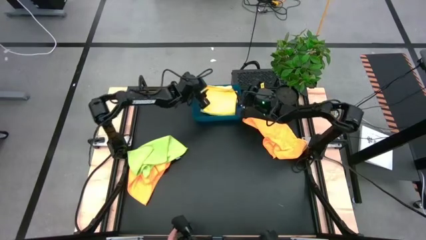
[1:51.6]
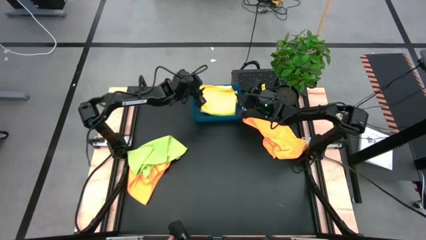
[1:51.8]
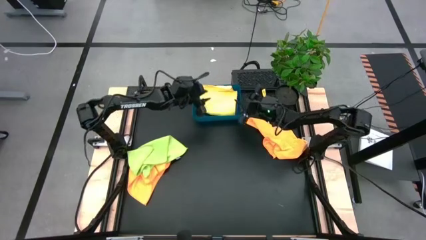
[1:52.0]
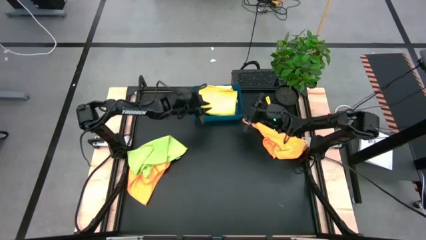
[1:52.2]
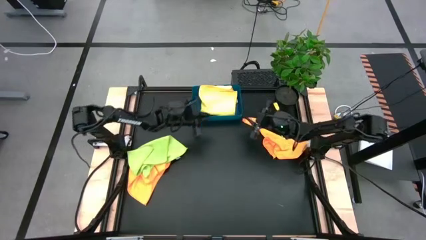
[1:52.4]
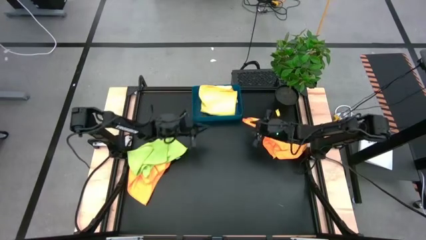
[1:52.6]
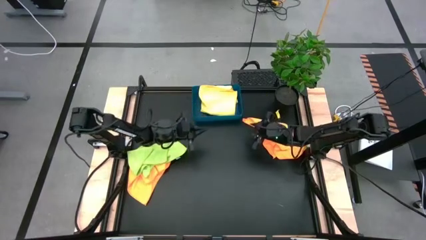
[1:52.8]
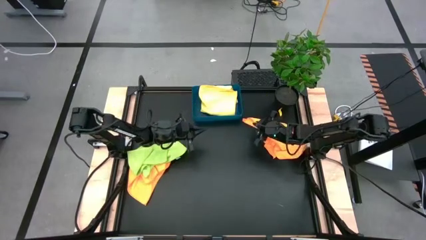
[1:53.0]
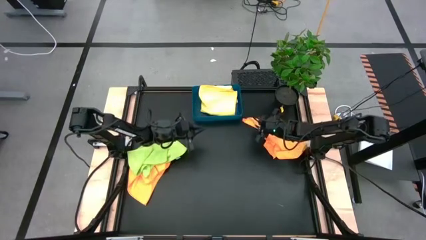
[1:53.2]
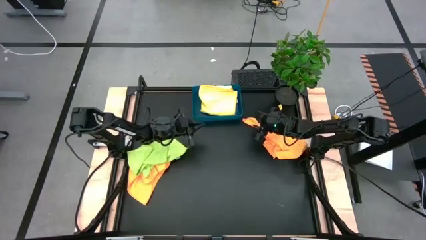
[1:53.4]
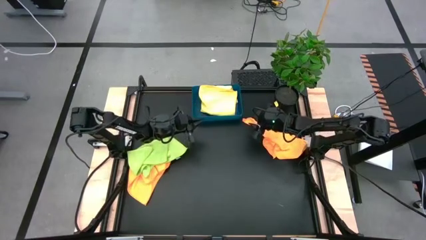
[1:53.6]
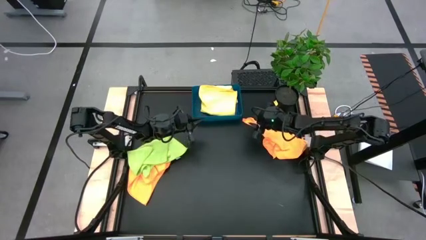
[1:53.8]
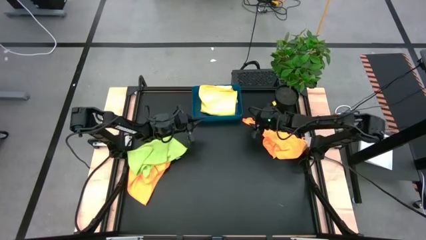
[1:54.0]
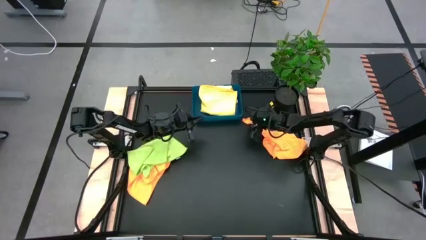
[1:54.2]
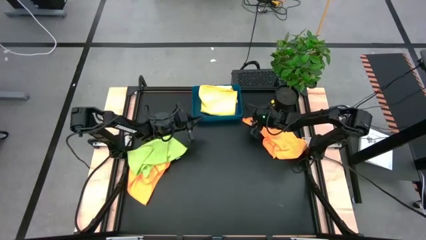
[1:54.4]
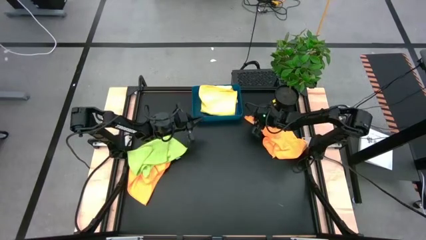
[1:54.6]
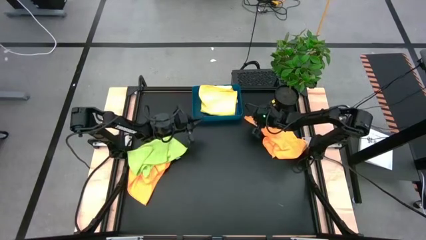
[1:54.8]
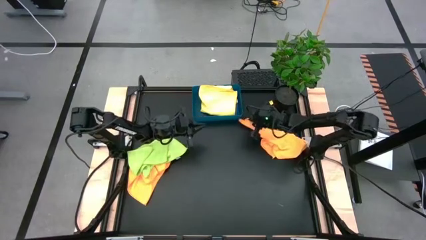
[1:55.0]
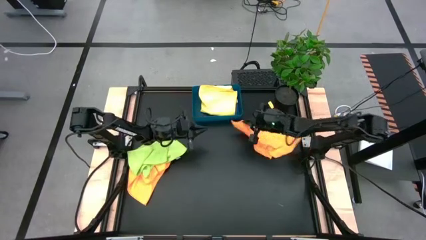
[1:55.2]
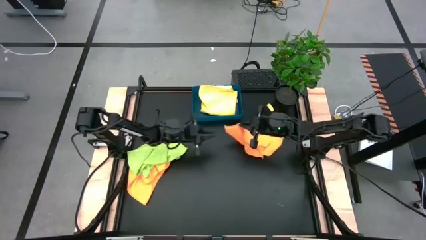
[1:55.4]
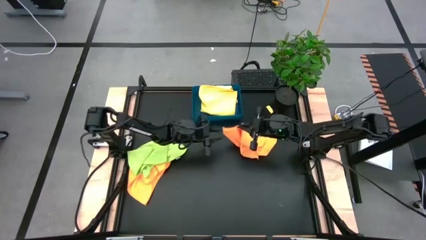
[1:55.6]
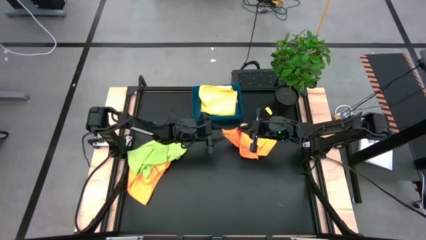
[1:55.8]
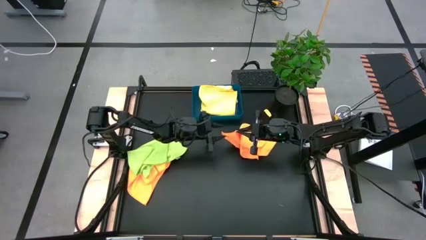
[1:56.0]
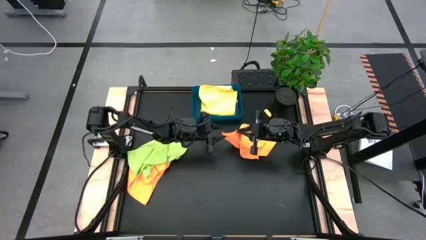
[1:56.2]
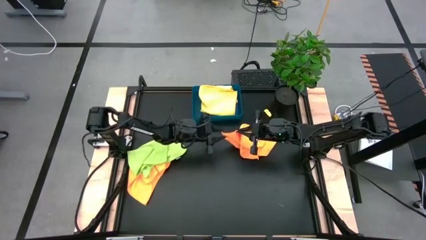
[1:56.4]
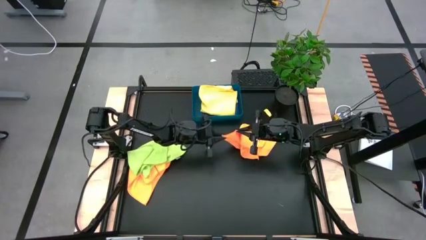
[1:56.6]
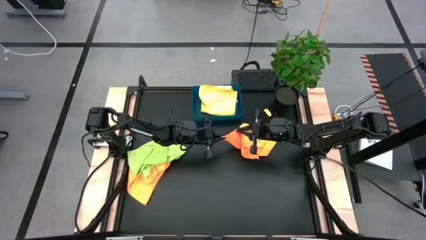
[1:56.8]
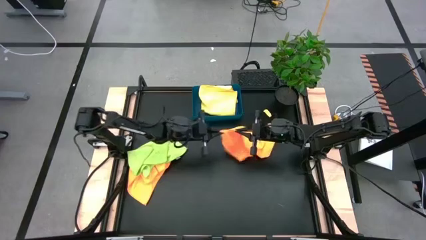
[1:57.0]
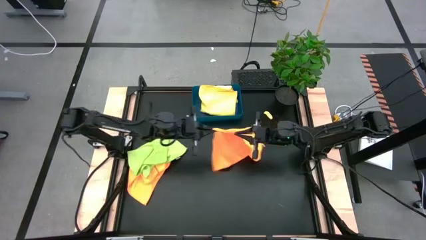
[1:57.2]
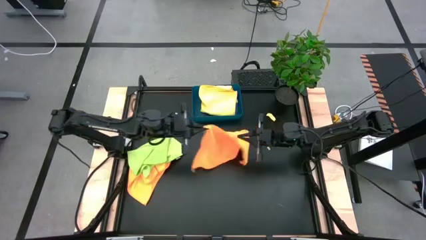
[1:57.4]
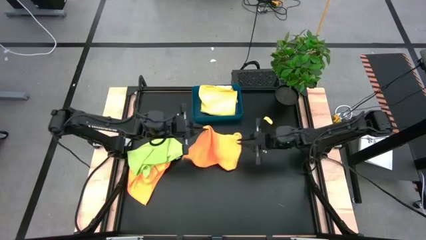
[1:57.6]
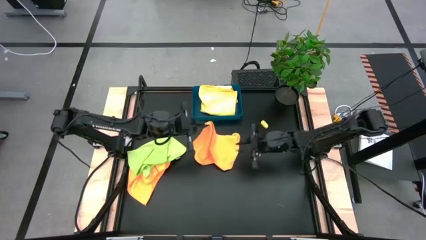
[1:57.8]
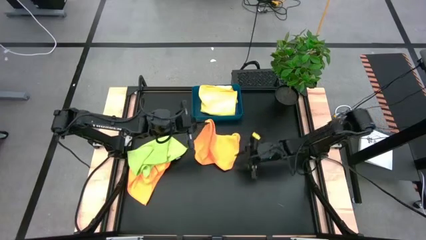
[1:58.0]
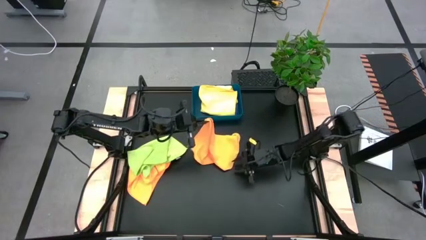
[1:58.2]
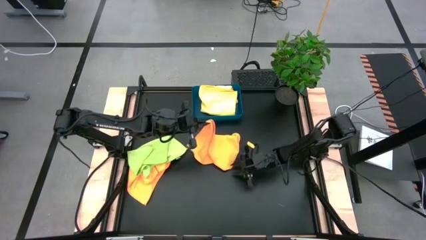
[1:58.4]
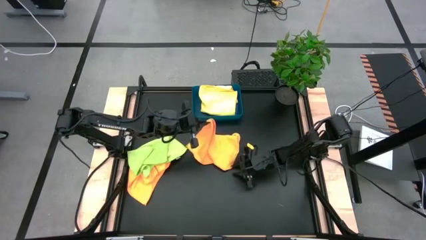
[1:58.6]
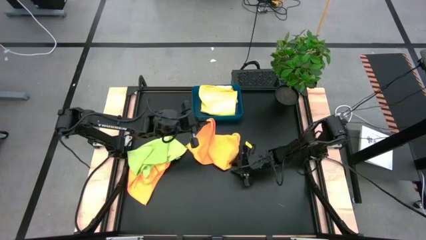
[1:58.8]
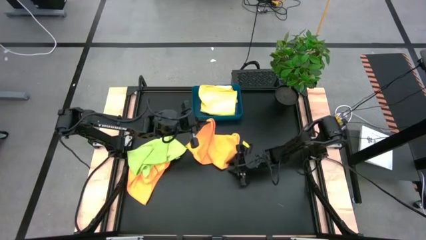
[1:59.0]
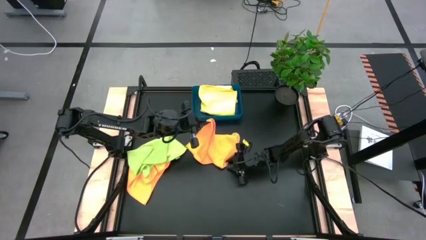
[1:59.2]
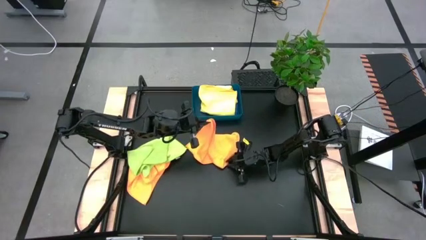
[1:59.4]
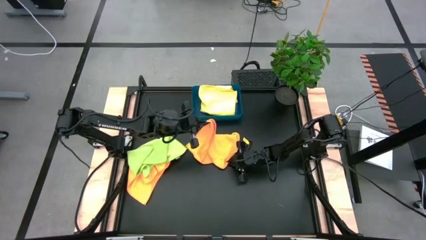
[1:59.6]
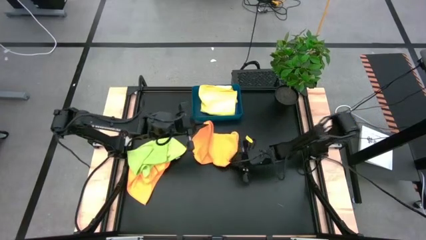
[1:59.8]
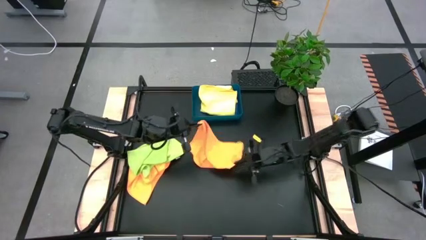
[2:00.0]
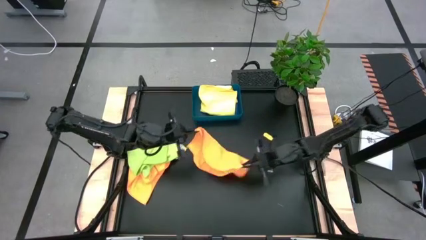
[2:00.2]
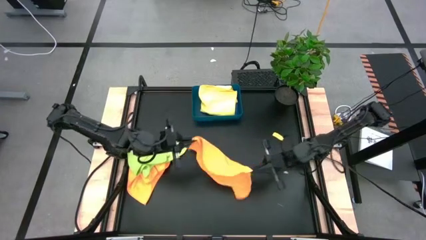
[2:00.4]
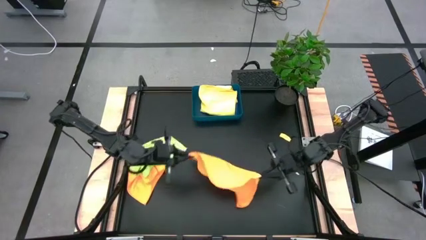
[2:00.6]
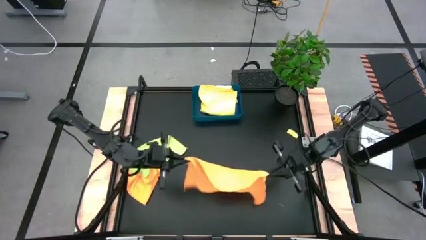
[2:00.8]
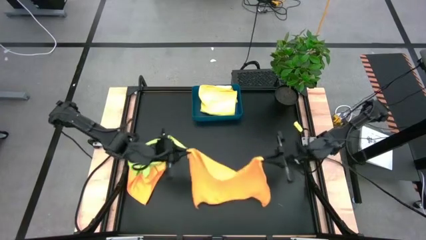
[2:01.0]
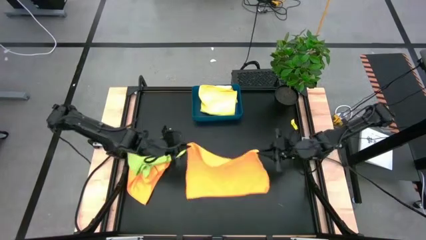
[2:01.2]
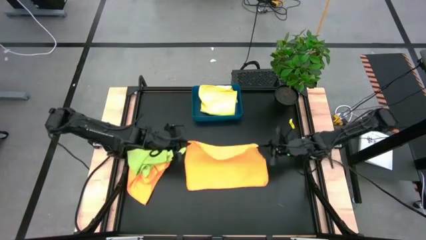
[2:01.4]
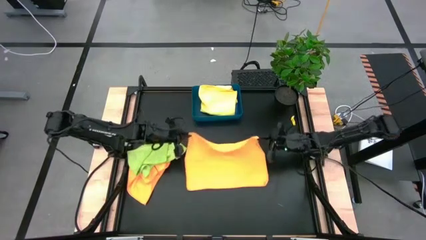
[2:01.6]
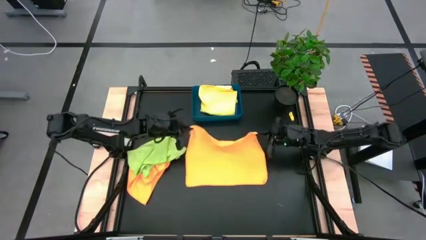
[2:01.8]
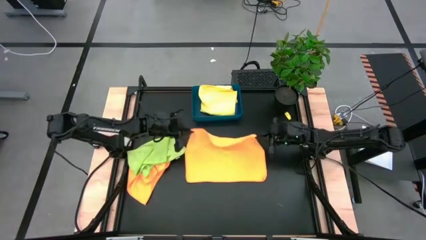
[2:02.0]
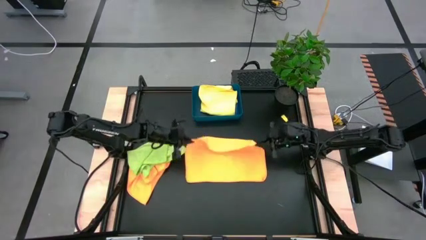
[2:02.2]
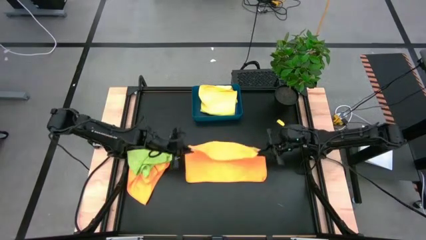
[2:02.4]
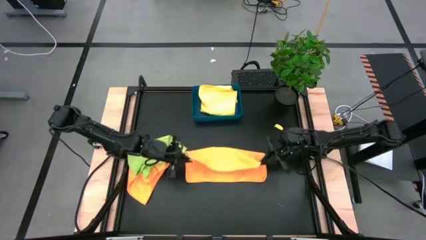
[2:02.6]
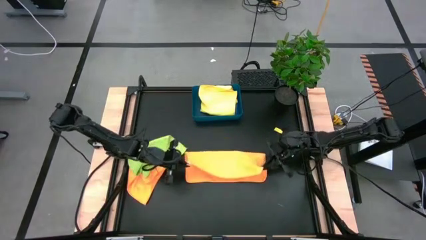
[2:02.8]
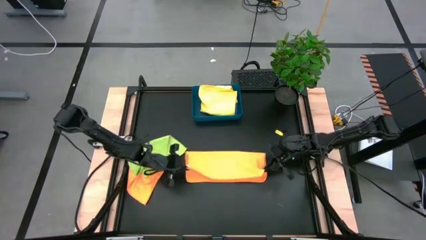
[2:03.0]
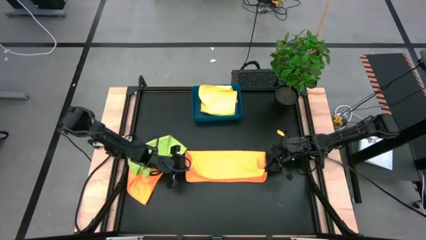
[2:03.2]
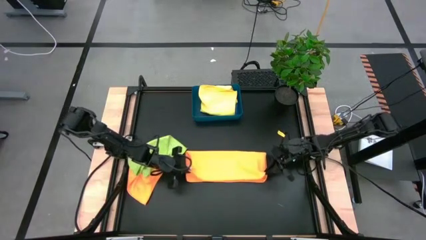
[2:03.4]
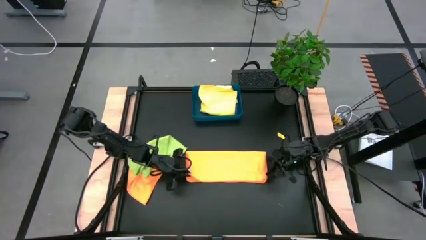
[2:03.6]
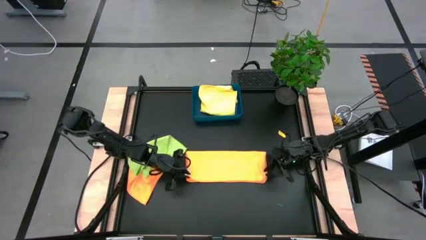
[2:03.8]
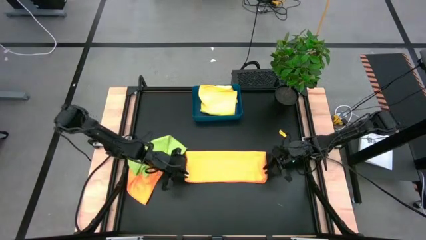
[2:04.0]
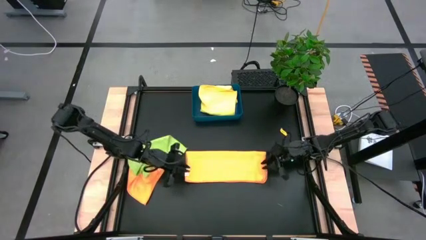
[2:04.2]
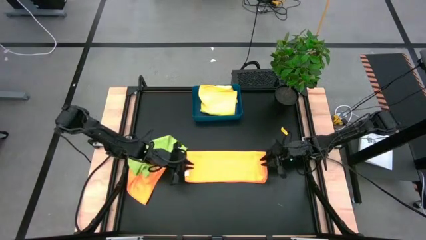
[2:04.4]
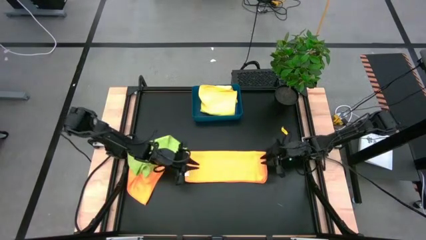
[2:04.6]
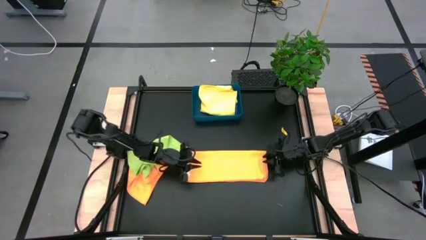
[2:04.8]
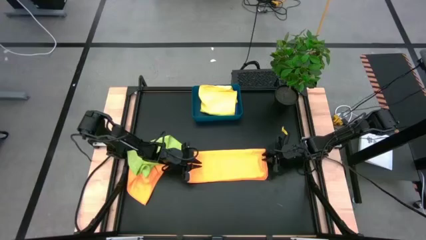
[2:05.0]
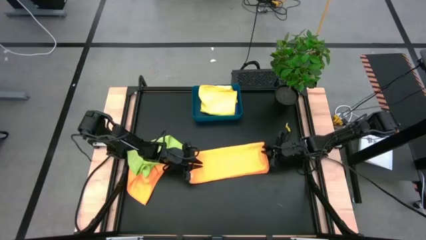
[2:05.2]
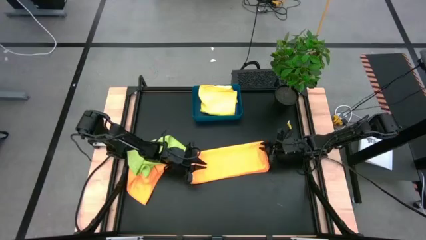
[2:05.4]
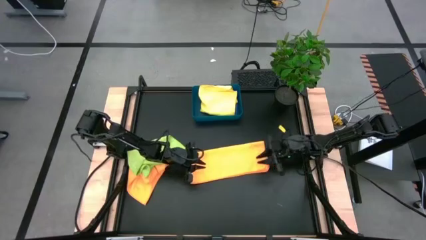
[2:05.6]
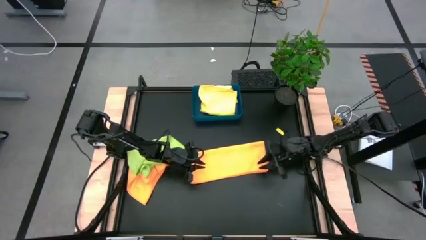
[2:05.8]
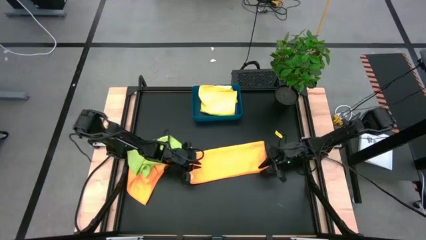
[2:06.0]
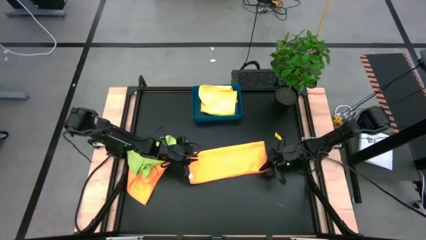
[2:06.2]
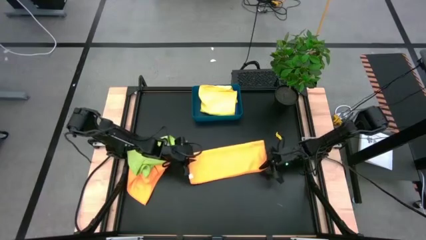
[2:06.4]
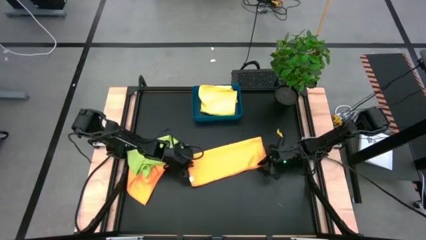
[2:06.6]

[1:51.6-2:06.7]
Task: Fold microfiber towels
Fold the right orange microfiber cloth
